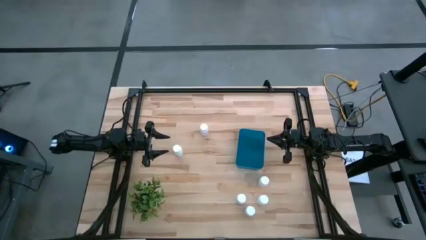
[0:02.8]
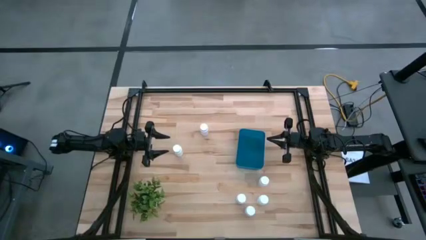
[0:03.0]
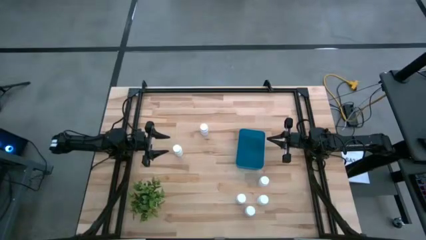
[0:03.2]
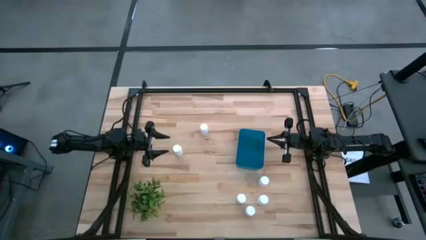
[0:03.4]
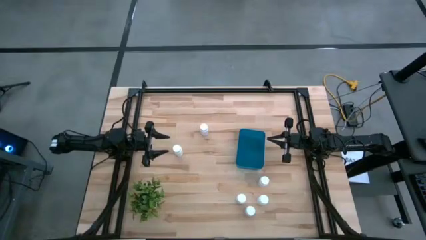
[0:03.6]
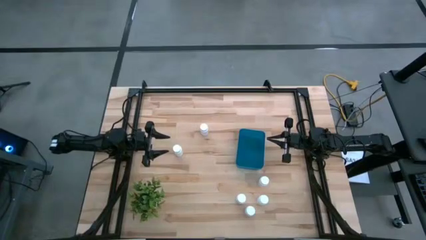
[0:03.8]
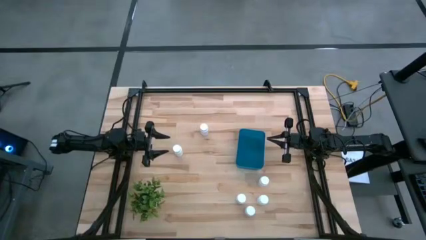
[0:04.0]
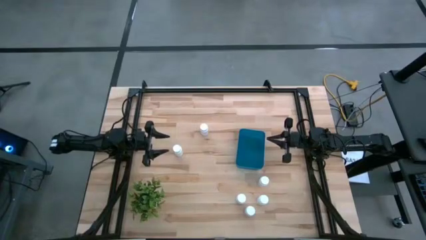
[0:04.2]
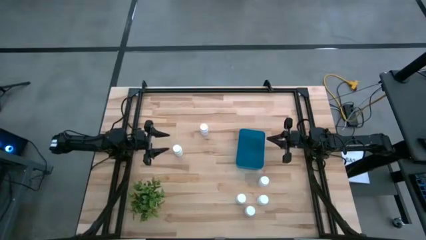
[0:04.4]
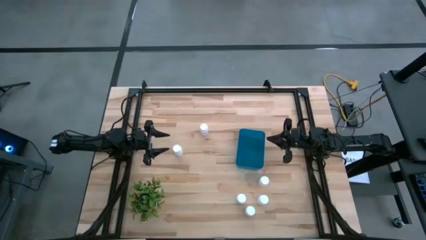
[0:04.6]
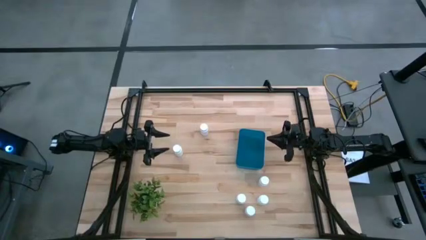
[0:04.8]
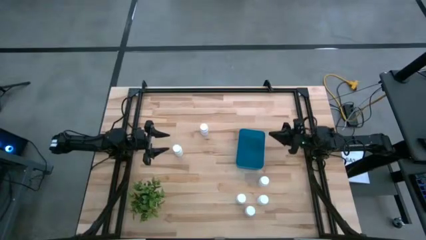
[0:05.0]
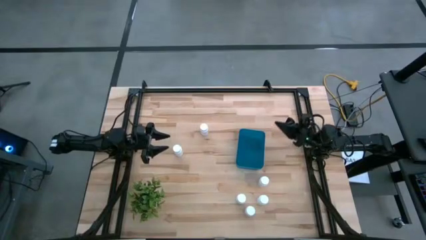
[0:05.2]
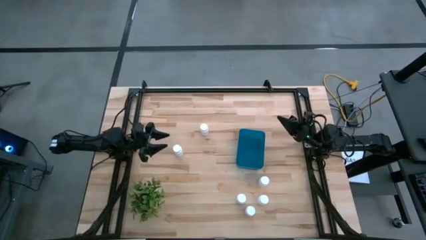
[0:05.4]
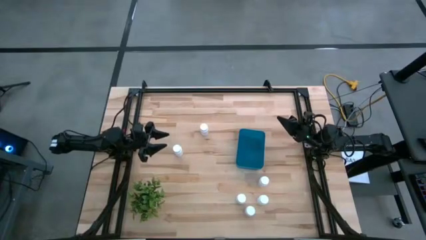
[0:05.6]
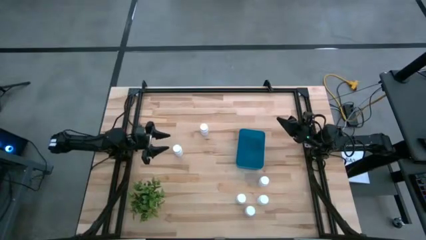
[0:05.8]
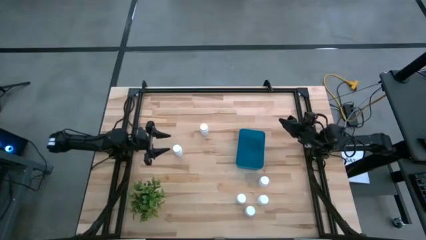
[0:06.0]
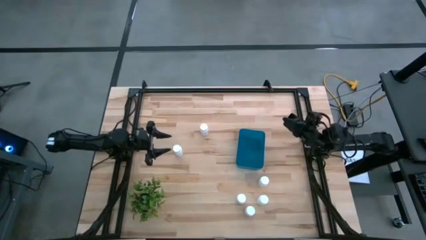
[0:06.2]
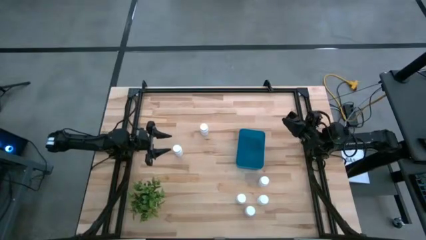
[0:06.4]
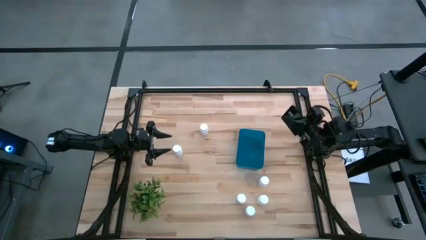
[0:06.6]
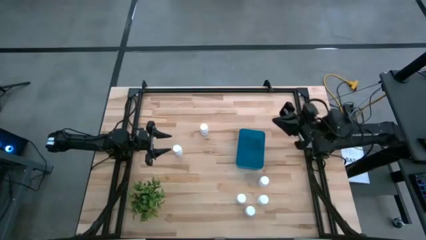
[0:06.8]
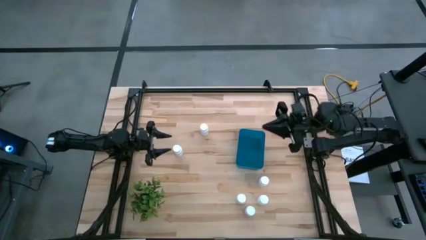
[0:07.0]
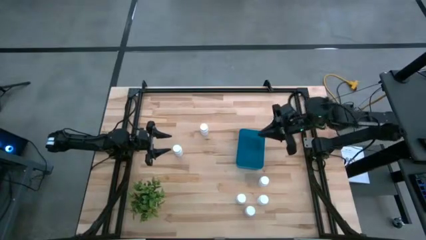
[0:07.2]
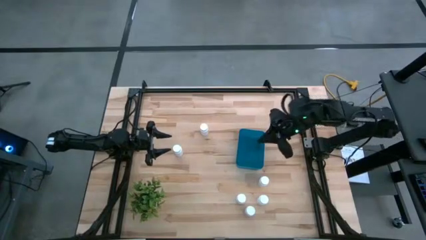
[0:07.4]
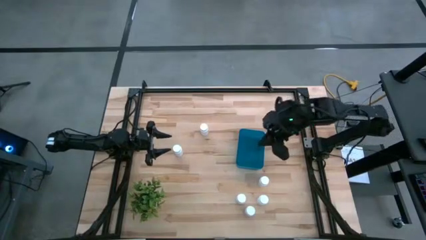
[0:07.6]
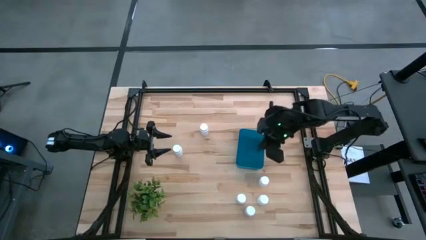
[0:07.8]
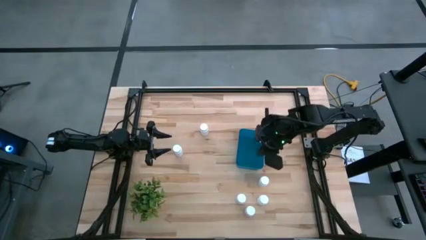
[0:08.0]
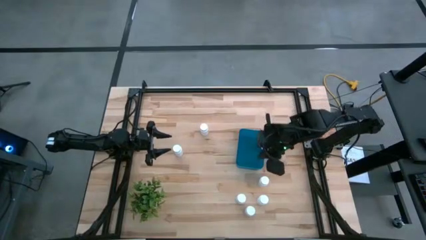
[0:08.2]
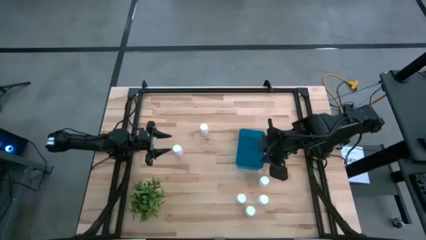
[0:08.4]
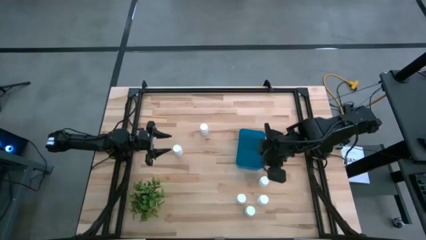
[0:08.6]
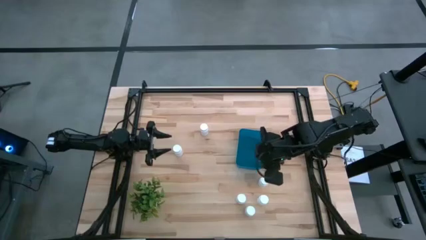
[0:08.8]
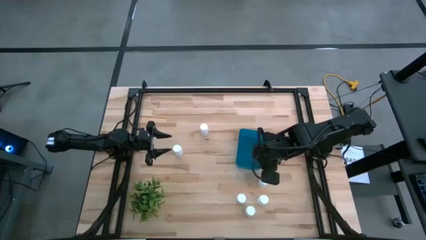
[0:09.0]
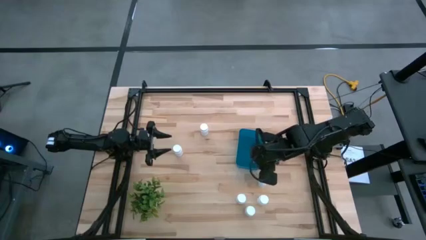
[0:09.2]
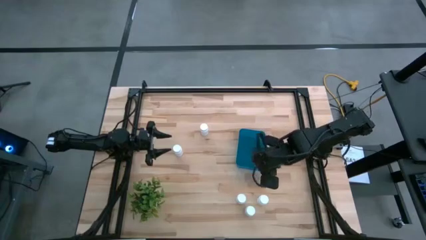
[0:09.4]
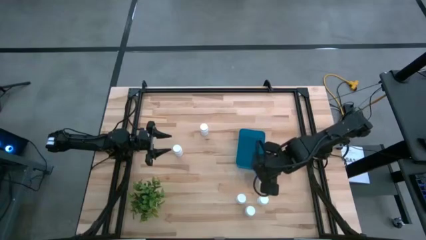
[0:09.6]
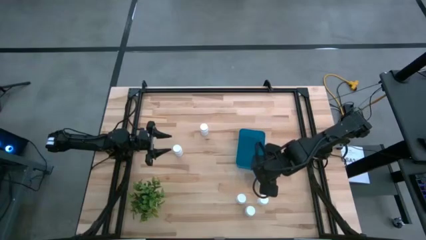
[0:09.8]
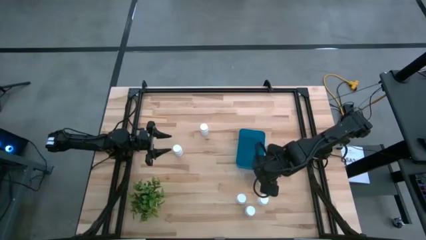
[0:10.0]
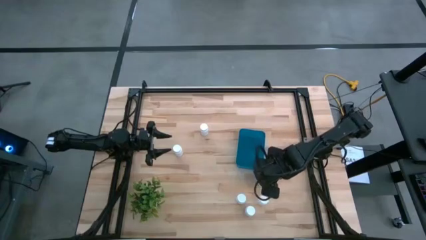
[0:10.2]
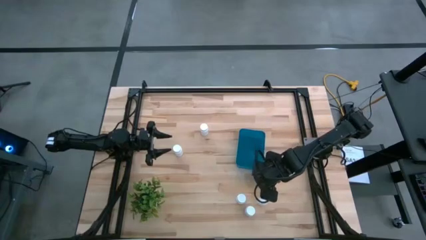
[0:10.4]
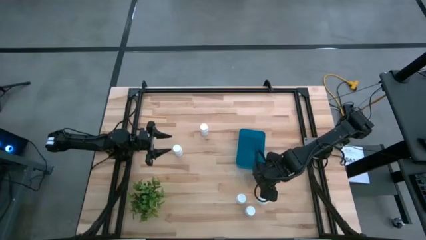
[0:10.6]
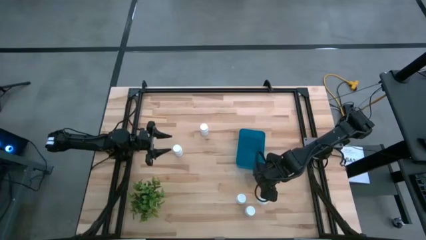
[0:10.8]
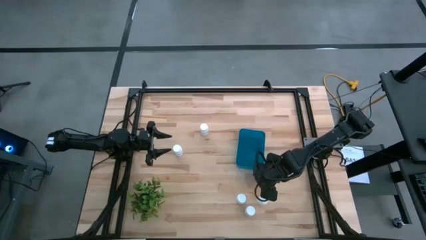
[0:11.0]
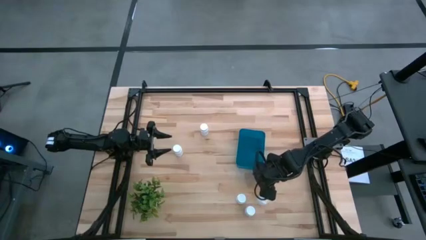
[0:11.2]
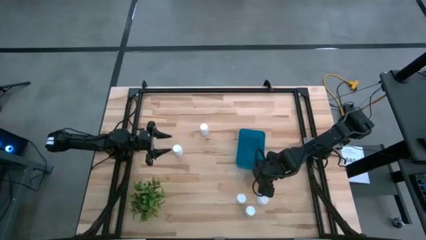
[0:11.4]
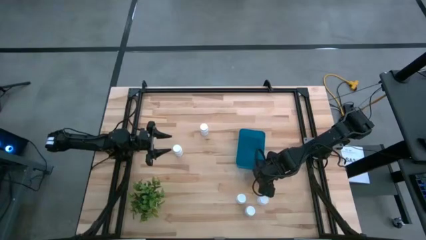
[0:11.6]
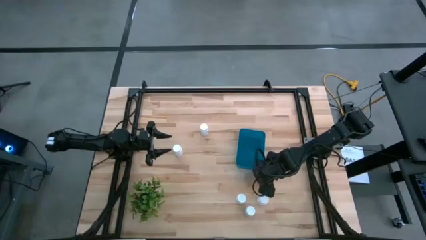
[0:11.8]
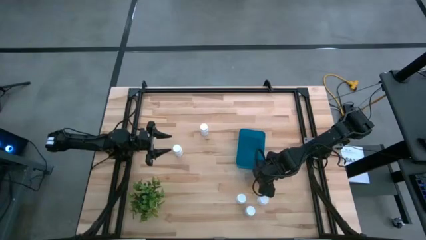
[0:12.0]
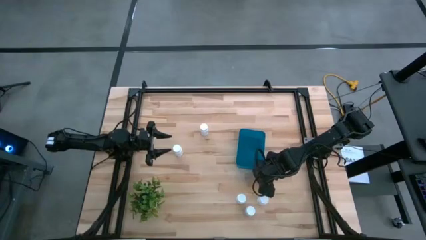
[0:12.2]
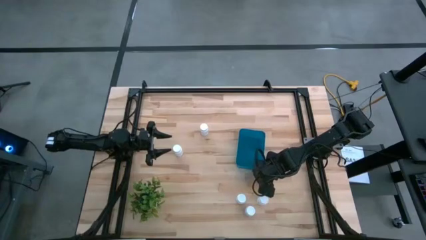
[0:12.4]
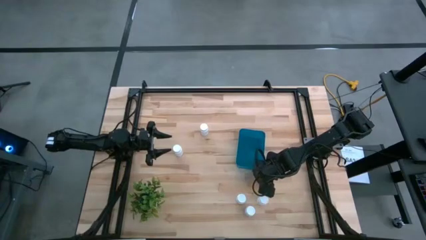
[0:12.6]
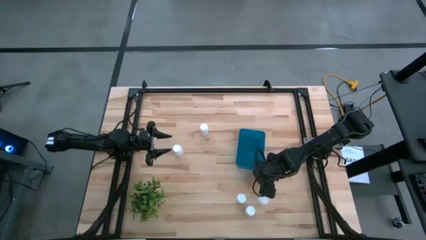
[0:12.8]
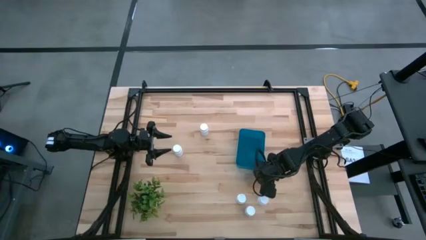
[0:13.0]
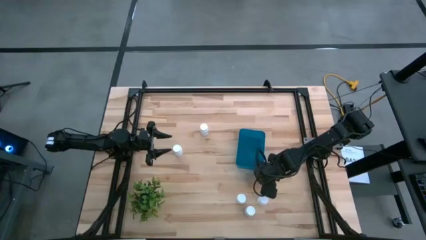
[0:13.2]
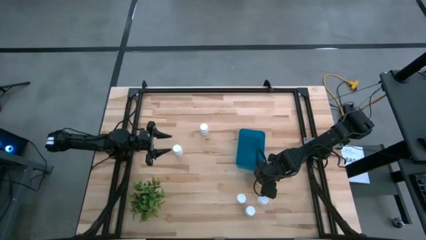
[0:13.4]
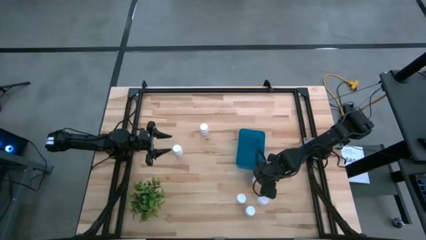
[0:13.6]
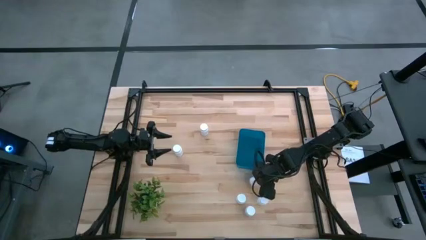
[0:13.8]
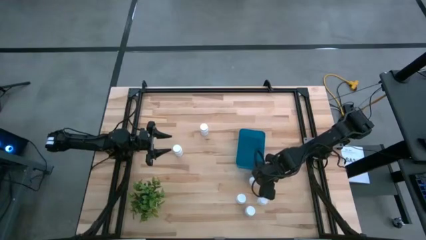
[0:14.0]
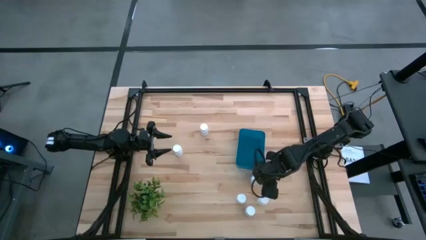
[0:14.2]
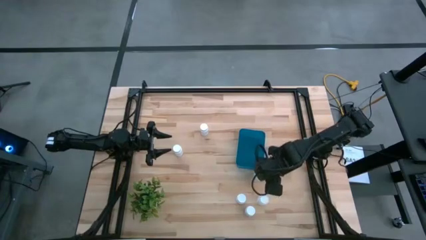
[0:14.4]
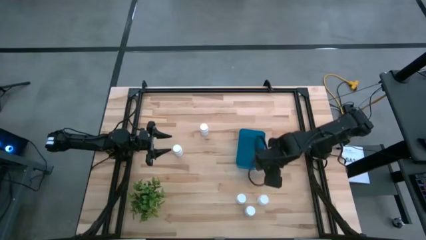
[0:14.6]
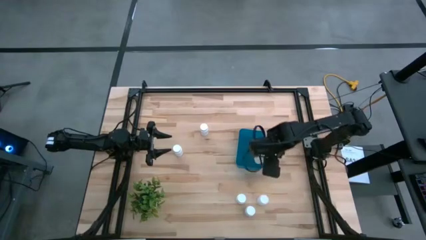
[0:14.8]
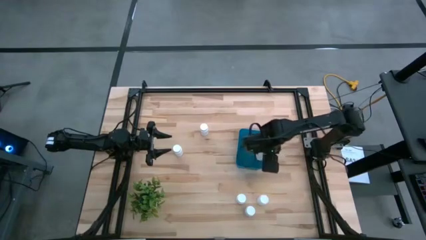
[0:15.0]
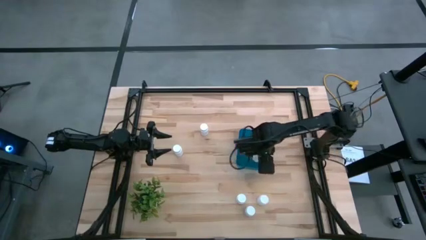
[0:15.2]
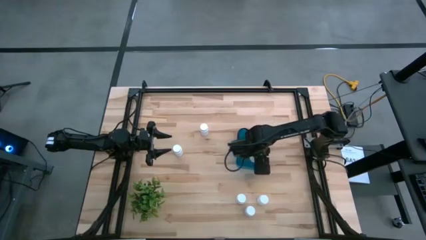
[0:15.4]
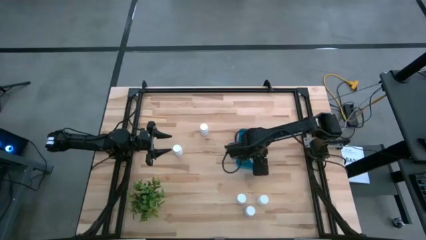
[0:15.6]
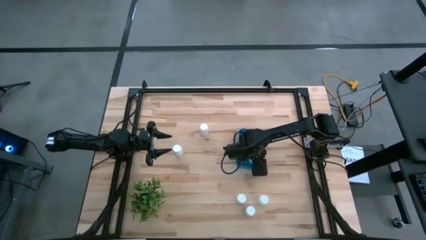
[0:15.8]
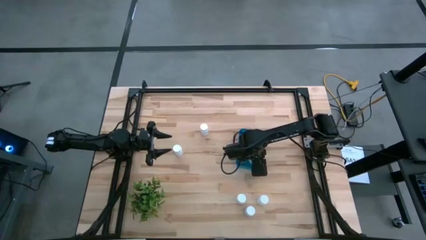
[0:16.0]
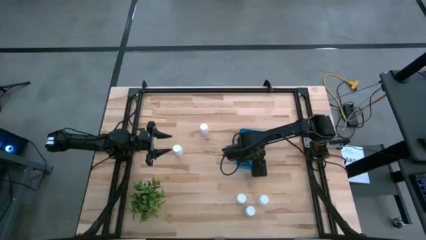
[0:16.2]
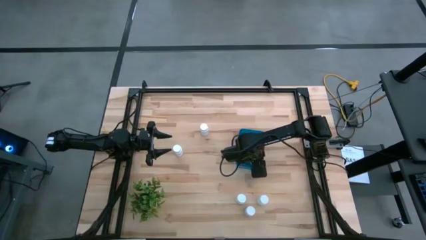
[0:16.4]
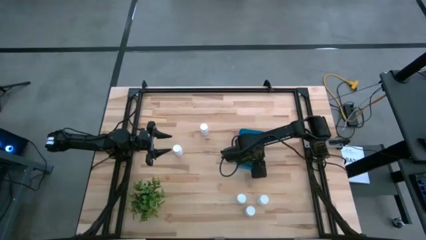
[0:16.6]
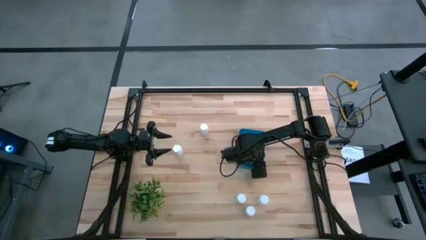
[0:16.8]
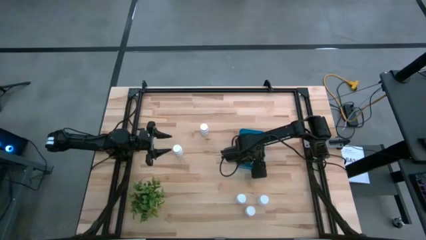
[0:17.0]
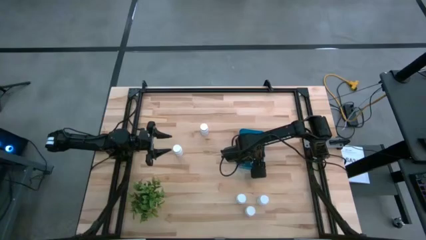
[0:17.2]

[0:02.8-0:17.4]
Task: Pick and place pill bottles into a basket
Put the white medicine bottle into the blue bin
